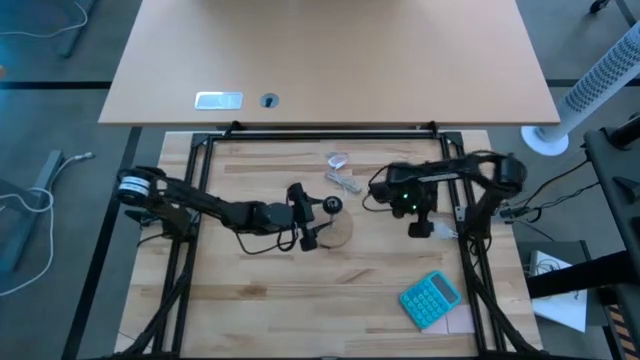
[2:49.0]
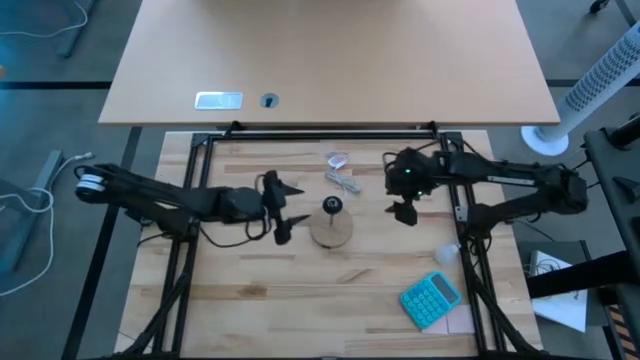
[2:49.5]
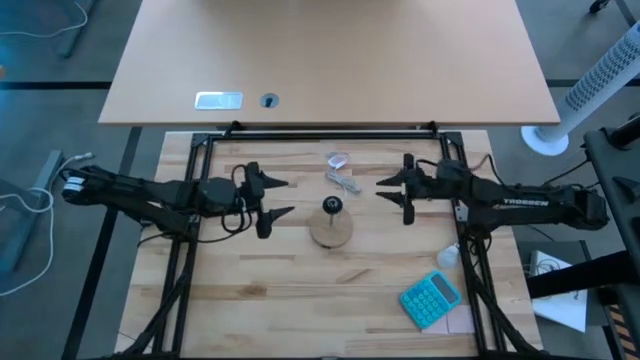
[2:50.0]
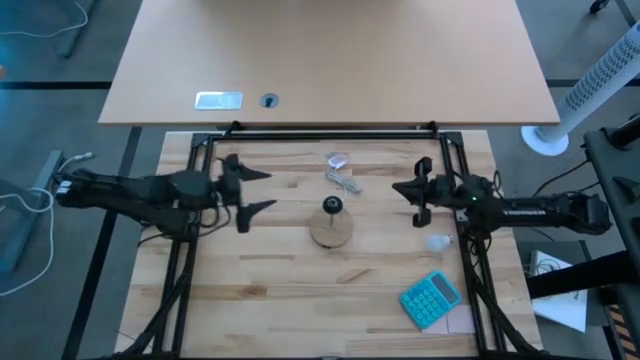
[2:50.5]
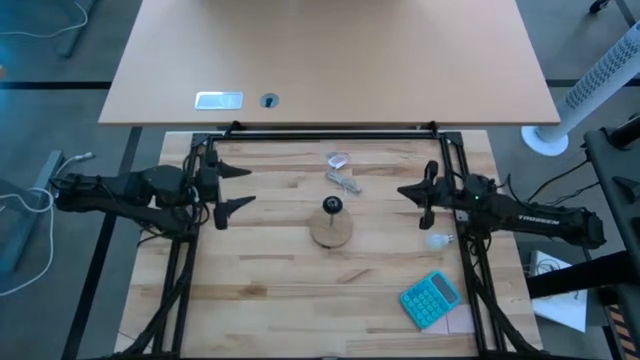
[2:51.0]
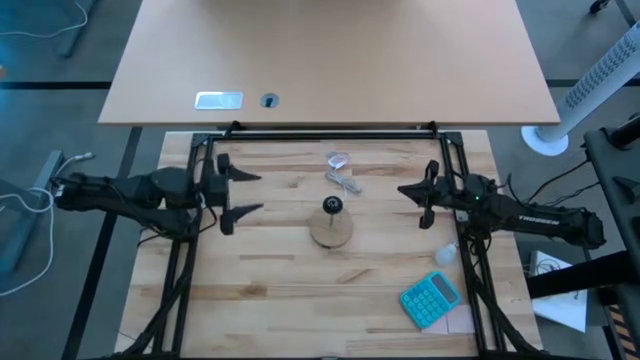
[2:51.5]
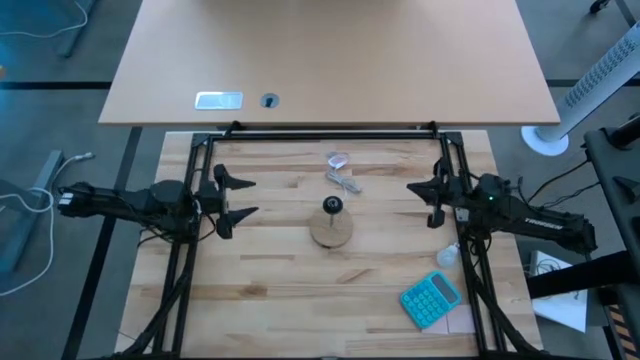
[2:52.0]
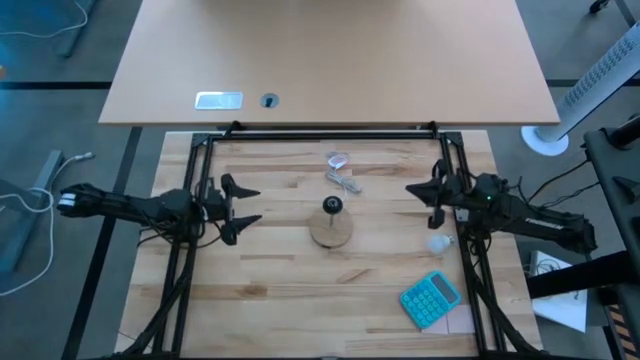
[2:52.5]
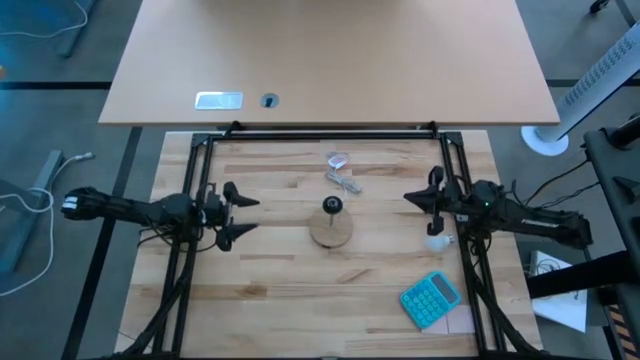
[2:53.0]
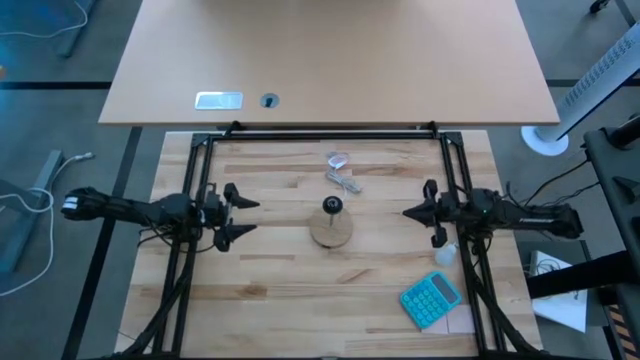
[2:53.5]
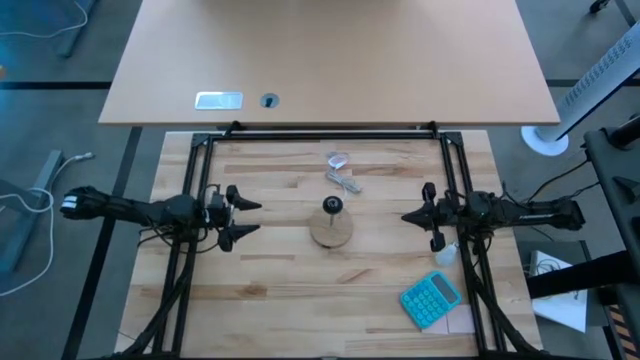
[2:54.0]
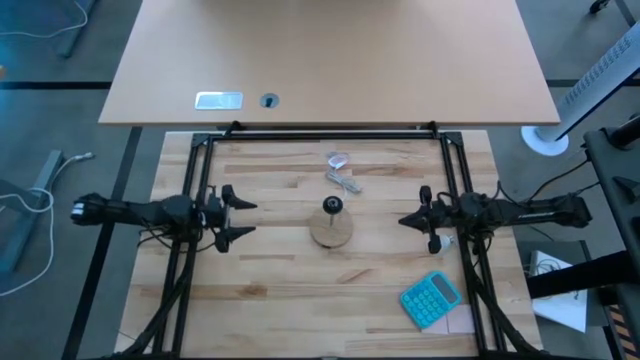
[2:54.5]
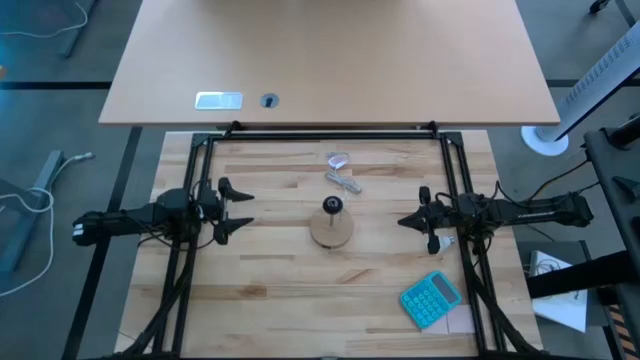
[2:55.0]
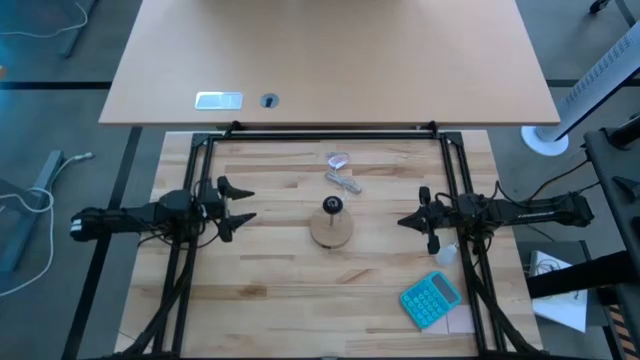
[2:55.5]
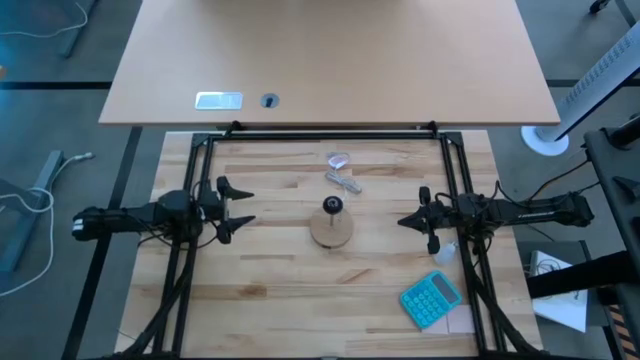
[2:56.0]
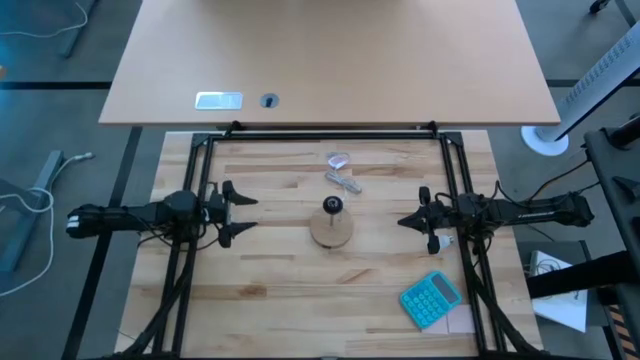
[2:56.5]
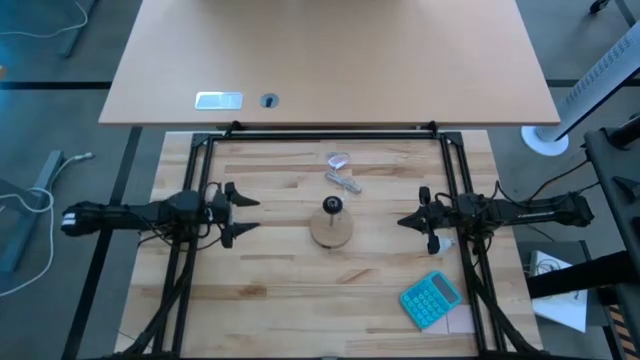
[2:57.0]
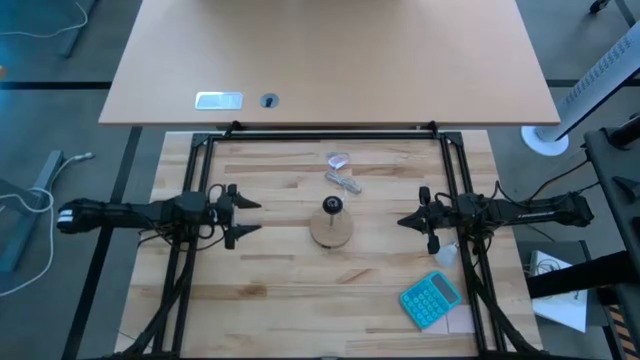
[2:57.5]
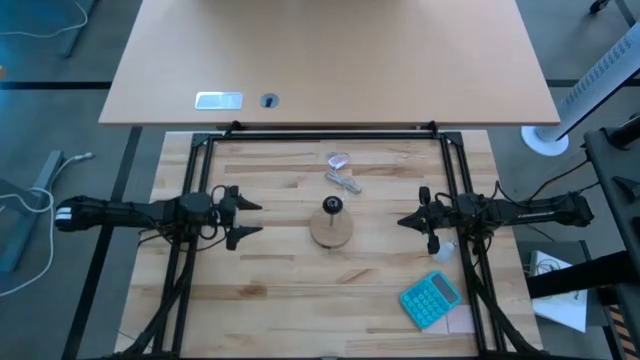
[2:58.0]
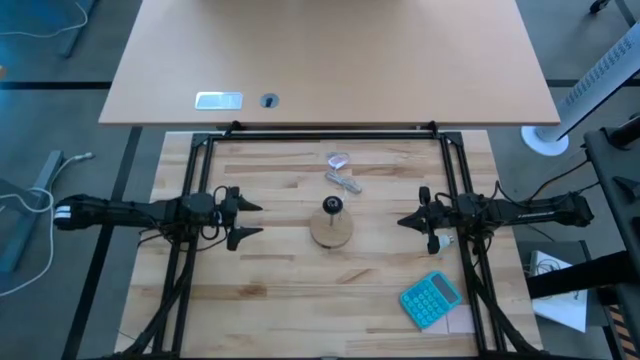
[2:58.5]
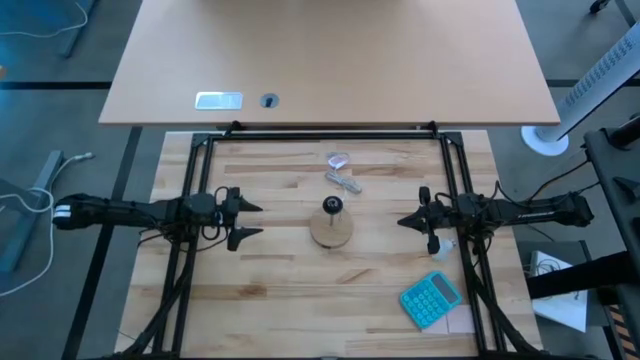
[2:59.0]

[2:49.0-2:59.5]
Task: Screw lightbulb
Return to Home Position

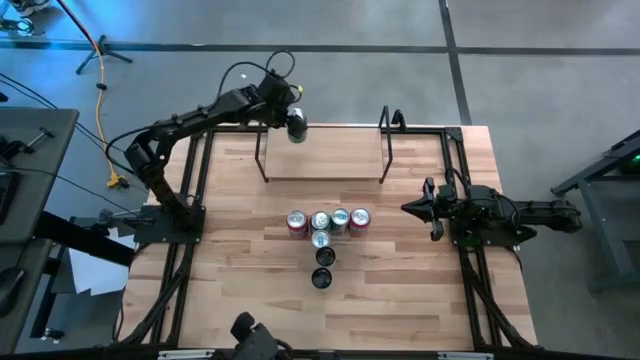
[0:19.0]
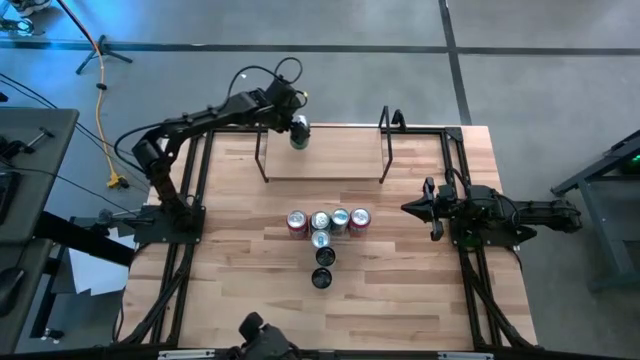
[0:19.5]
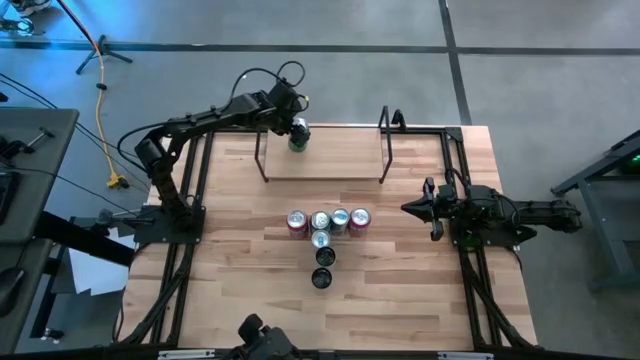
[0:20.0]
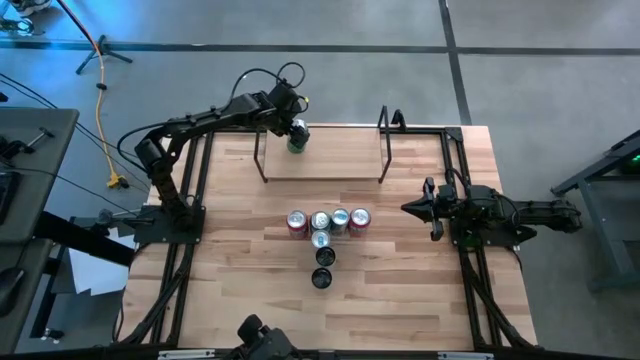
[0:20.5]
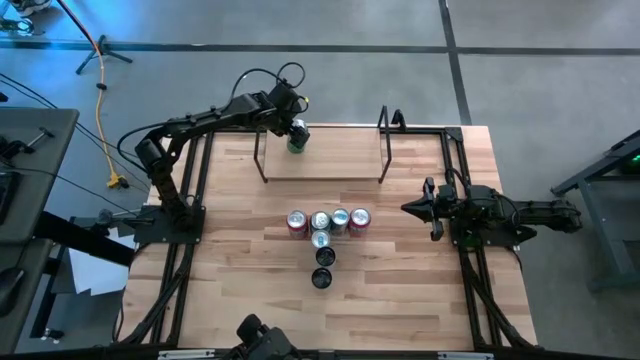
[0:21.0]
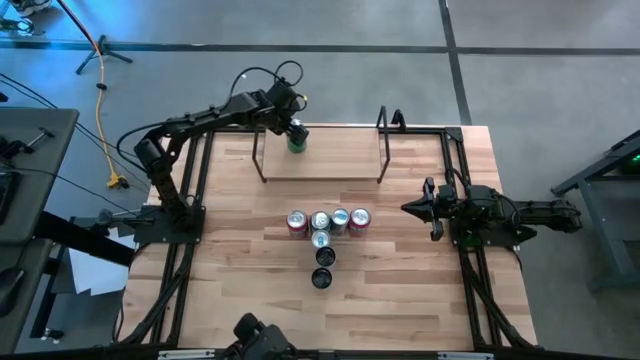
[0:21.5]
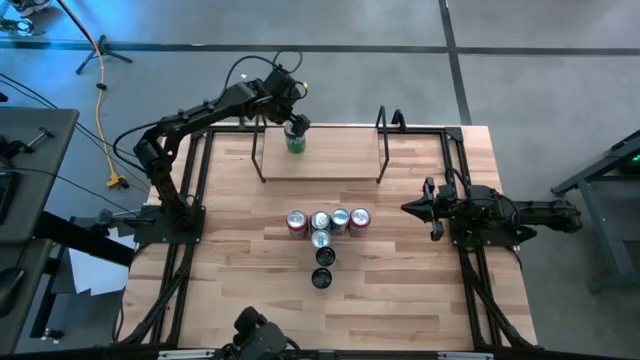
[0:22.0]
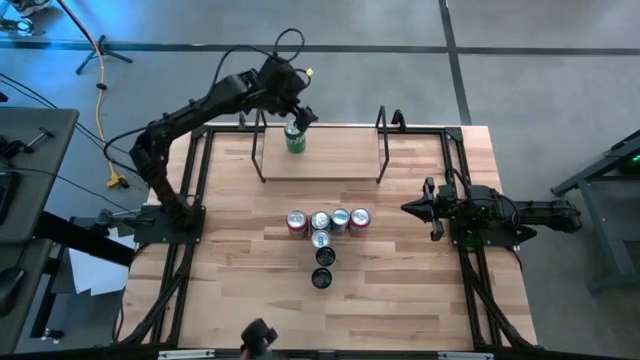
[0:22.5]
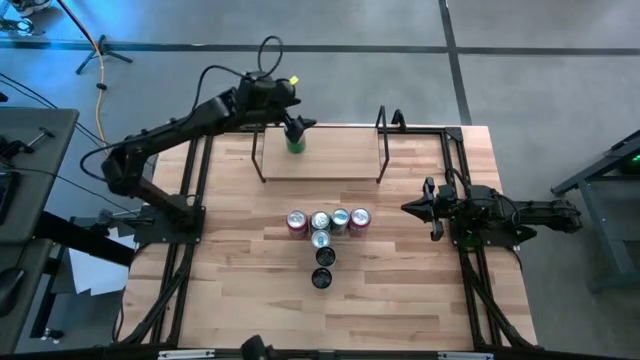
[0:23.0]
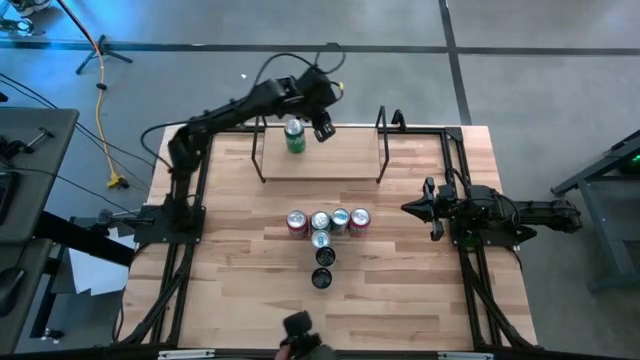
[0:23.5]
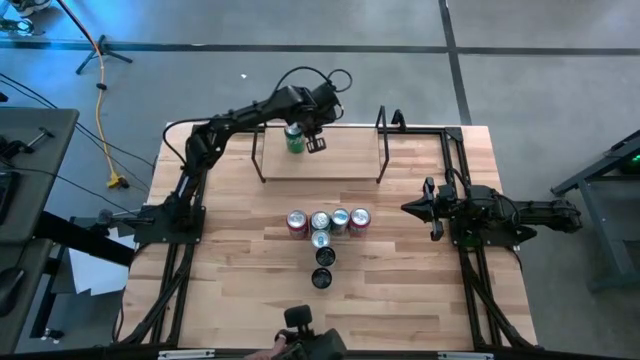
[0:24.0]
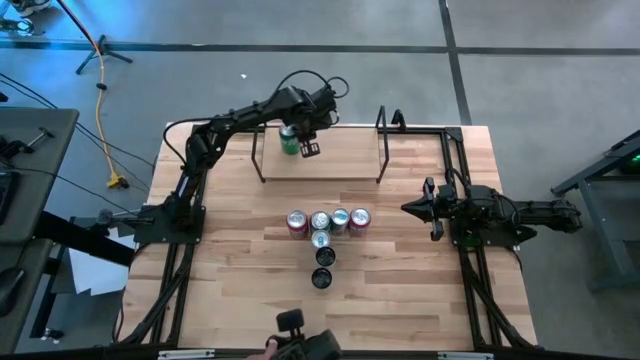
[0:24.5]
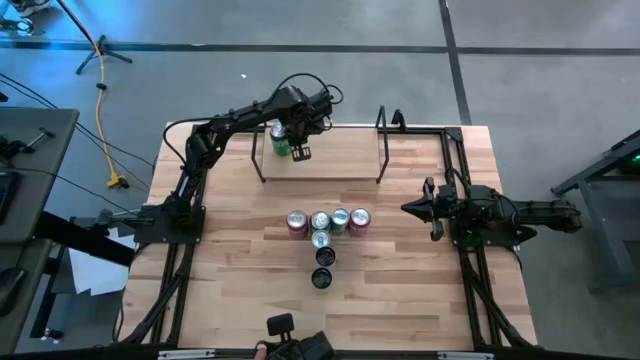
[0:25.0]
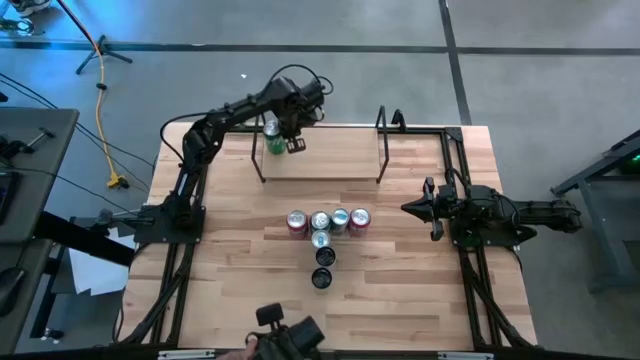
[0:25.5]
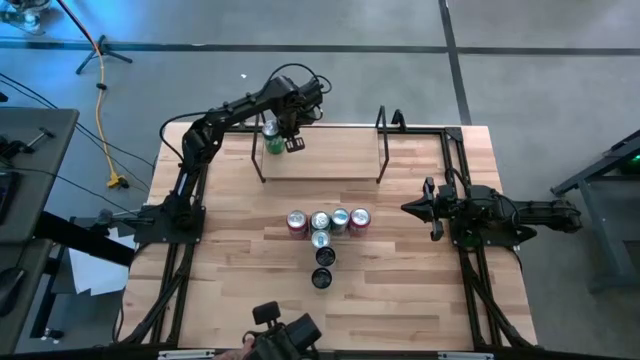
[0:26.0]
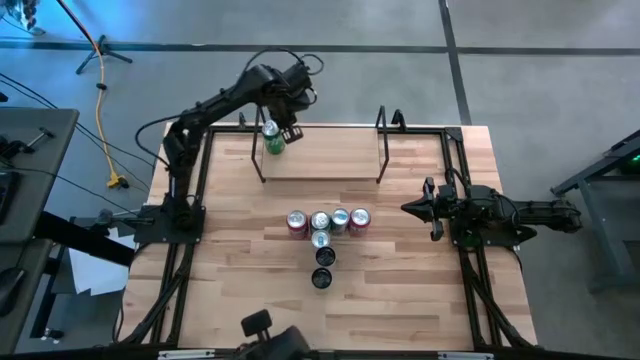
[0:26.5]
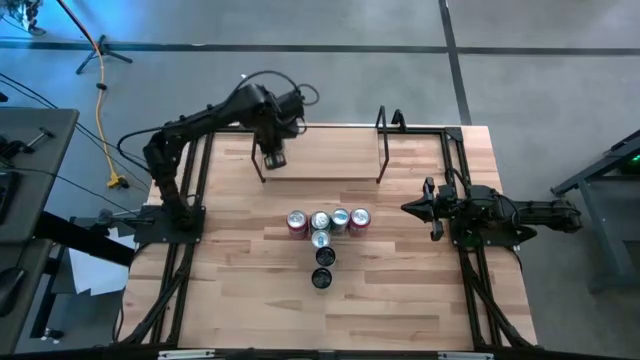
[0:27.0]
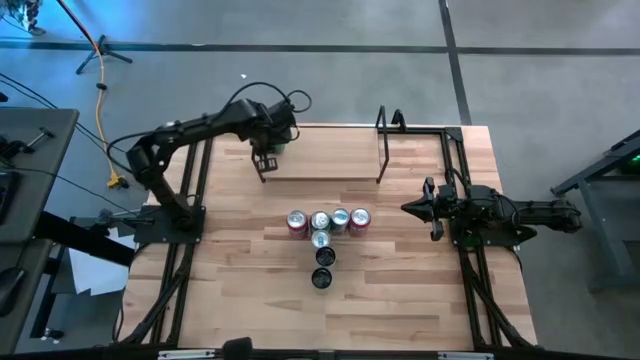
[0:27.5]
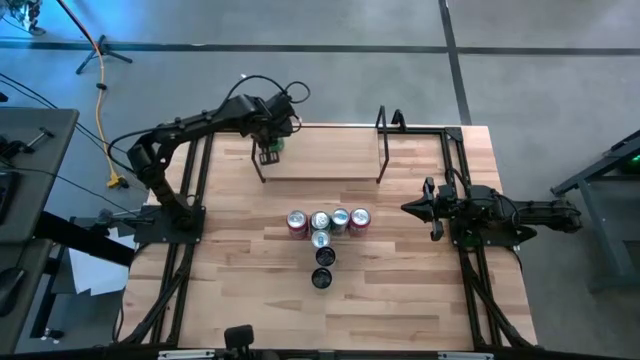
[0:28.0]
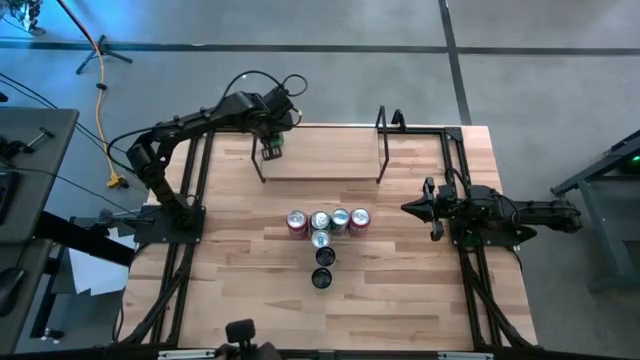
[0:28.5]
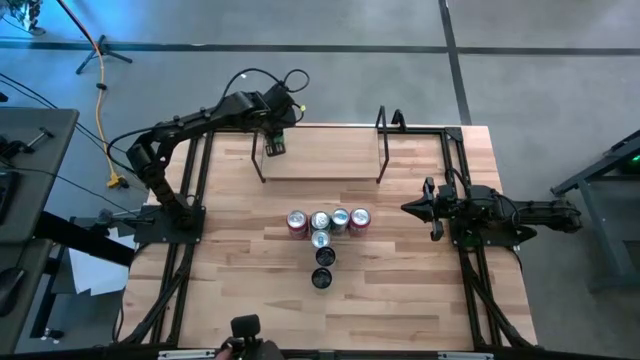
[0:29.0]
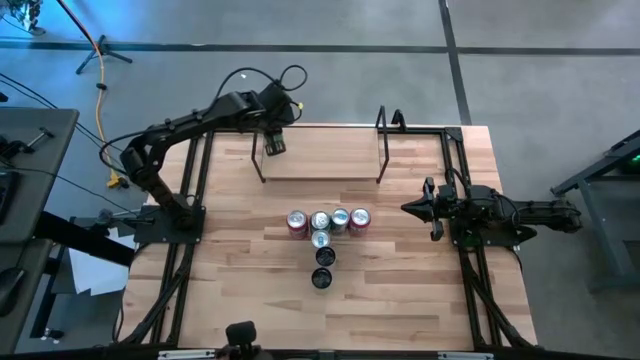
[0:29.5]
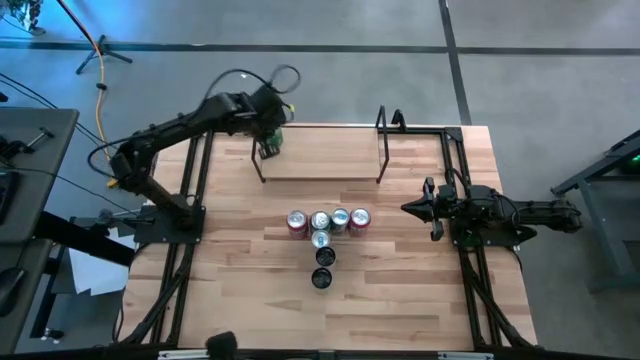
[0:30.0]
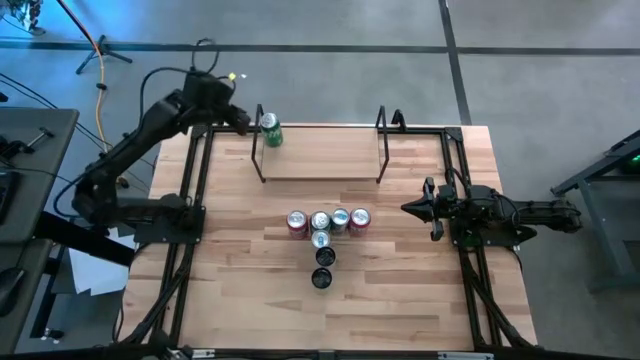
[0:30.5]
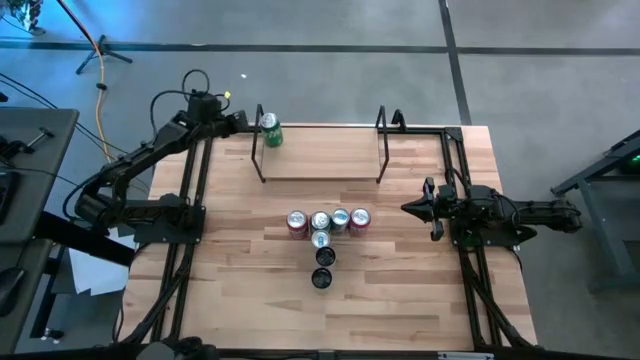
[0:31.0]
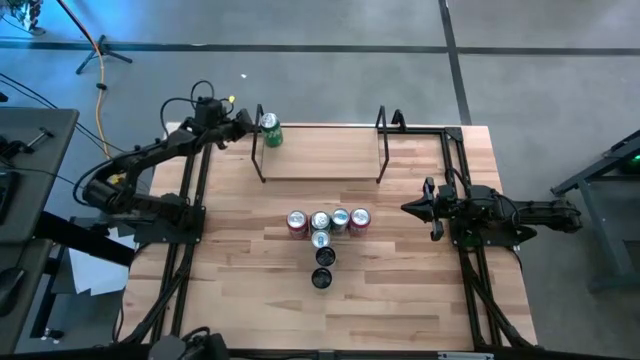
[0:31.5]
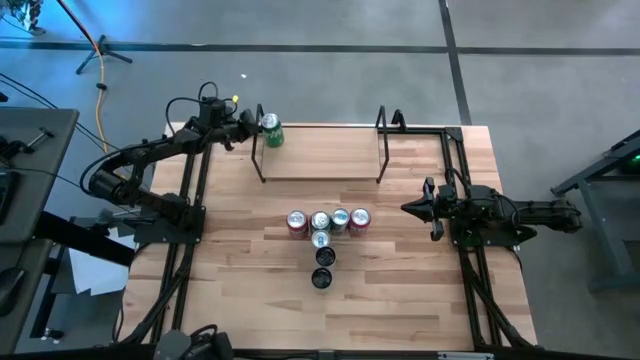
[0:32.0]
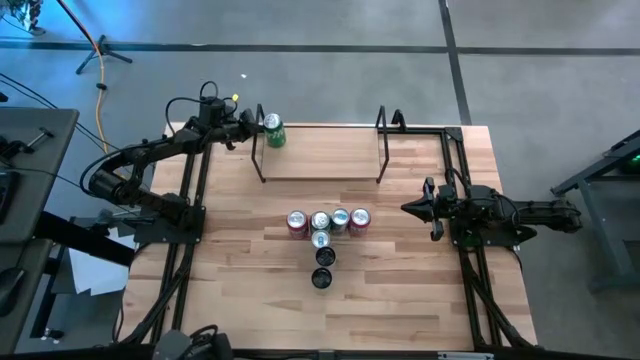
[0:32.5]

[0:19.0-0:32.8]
Task: Place canned beverage on shelf
Put the left green soda can on the shelf
